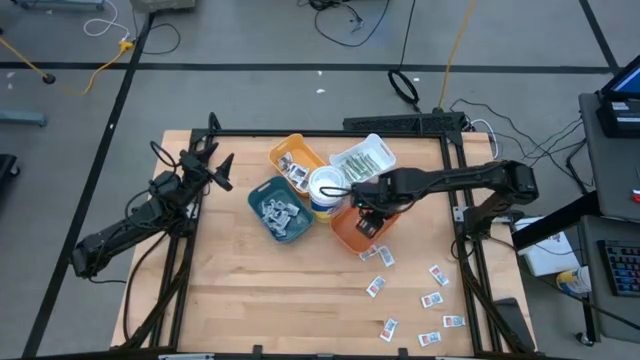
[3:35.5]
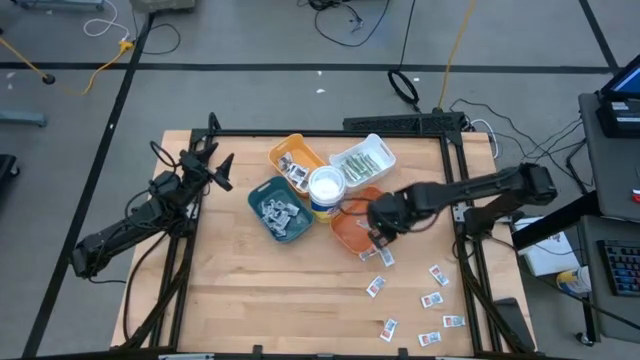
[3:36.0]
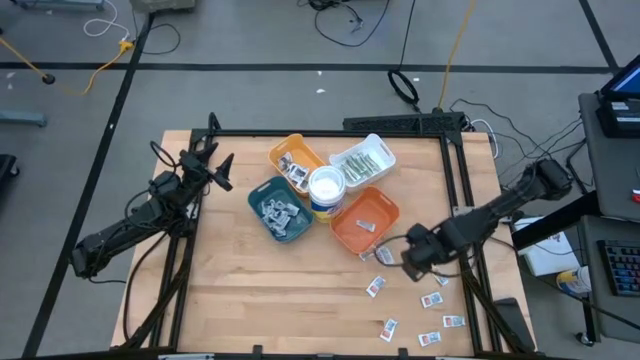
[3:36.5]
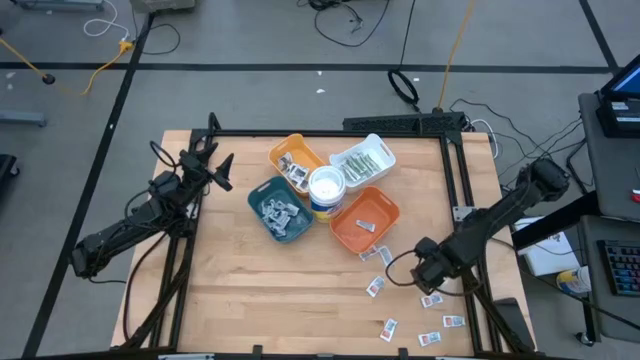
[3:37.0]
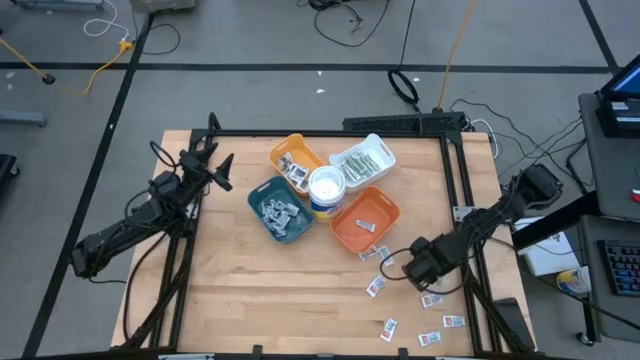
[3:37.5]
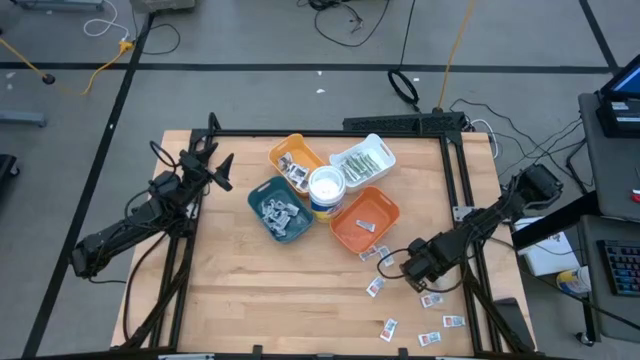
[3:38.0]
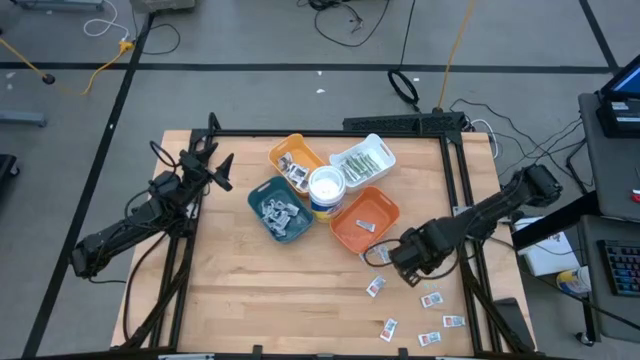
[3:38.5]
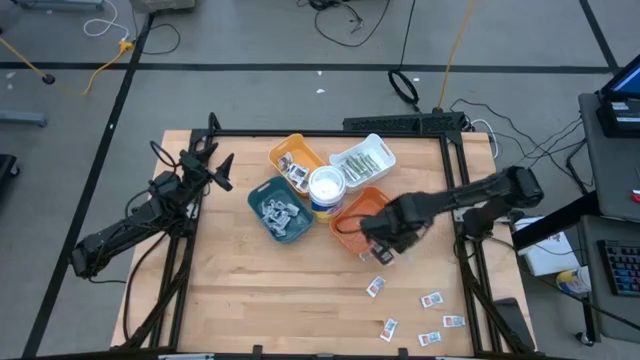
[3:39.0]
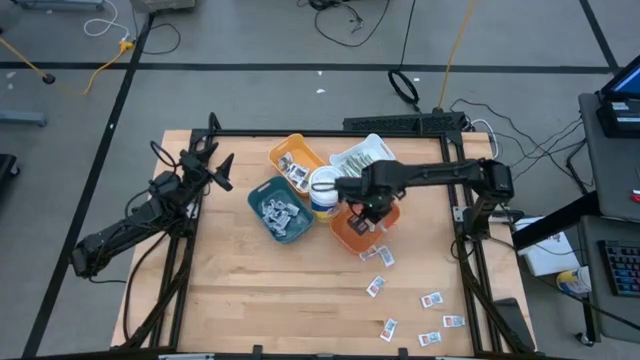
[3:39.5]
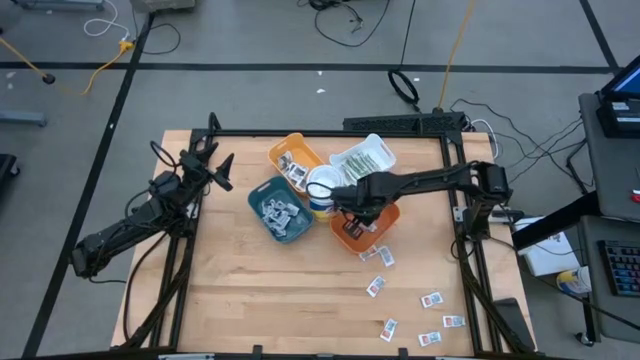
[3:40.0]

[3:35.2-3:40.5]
Task: Pick & Place First Aid Supplies
Put the orange pad into the orange bin

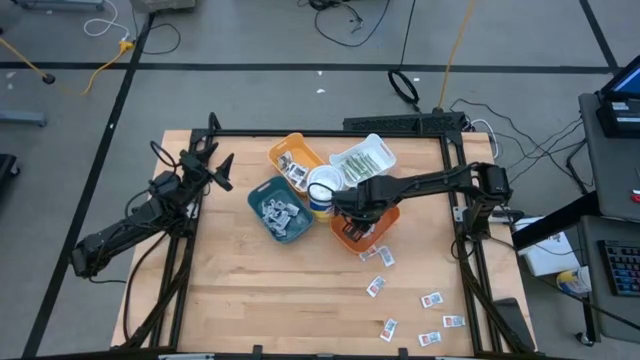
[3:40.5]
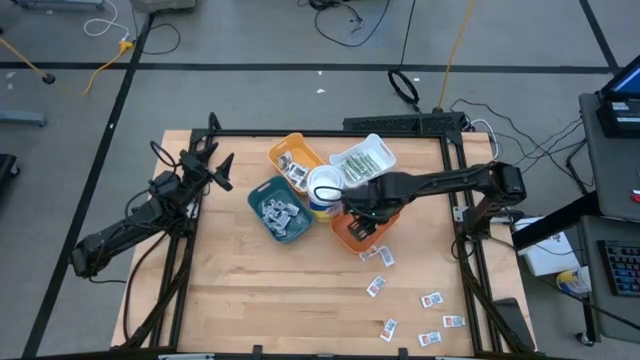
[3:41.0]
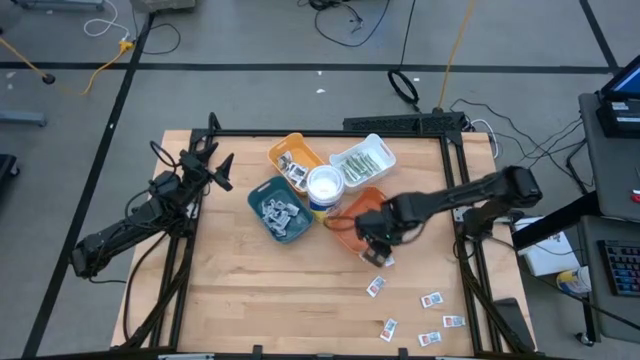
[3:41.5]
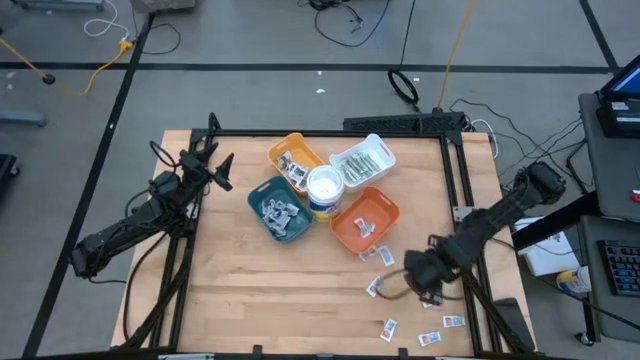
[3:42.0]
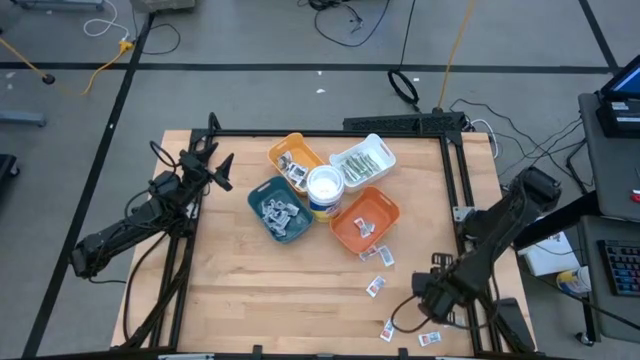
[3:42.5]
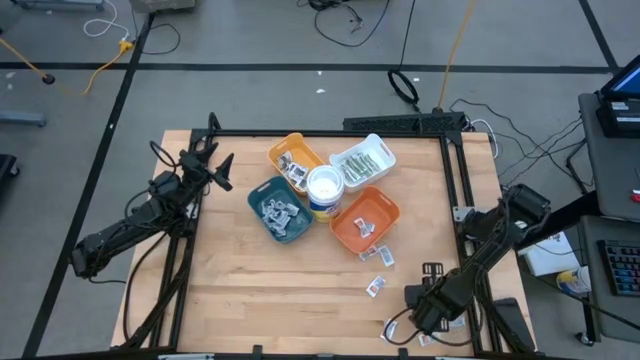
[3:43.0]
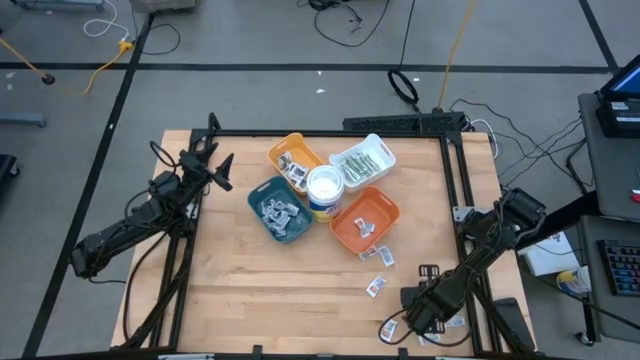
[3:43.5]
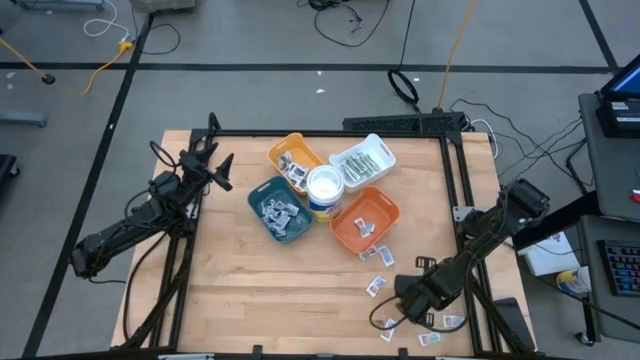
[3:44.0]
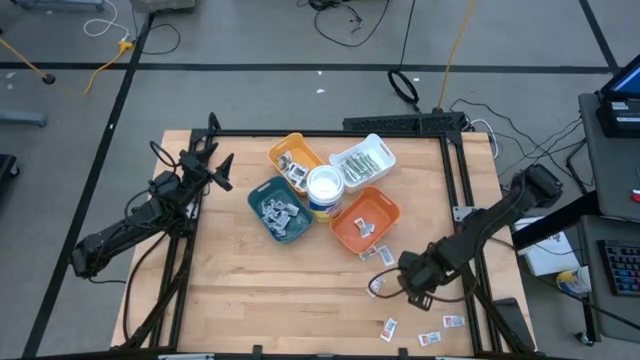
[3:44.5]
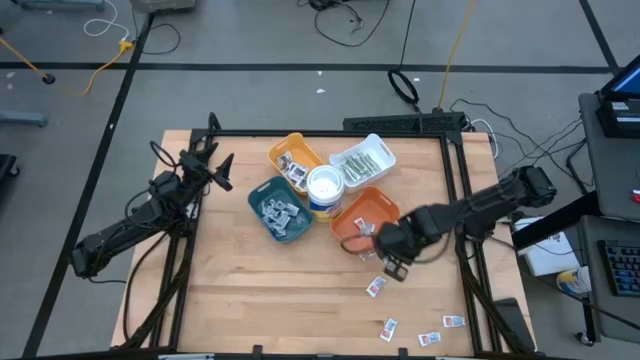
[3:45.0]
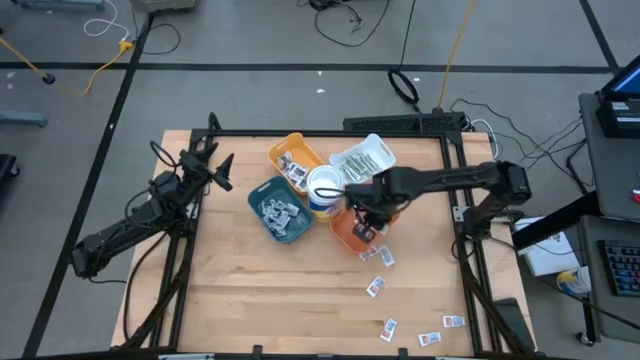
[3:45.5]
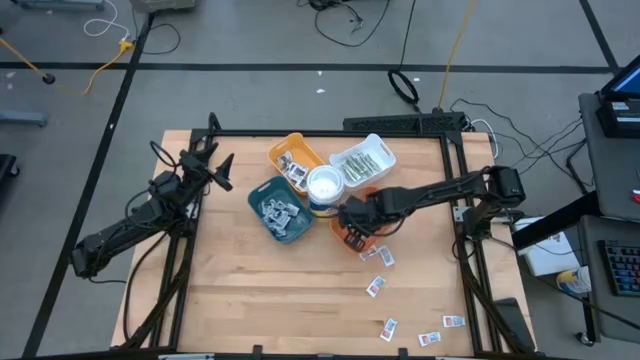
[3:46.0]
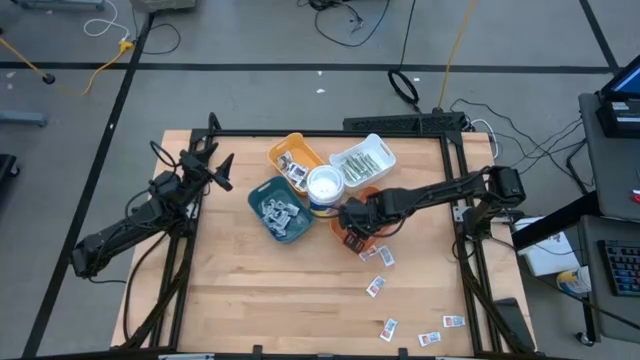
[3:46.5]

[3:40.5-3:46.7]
Put the orange pad into the orange bin

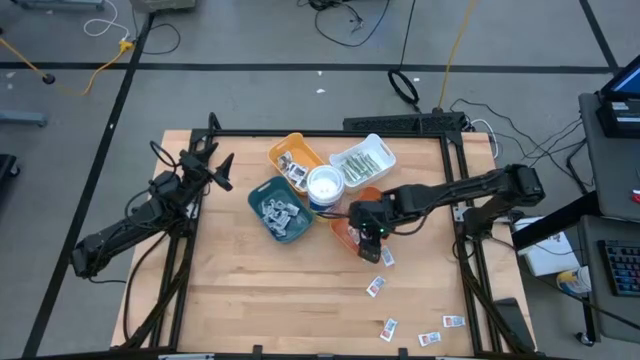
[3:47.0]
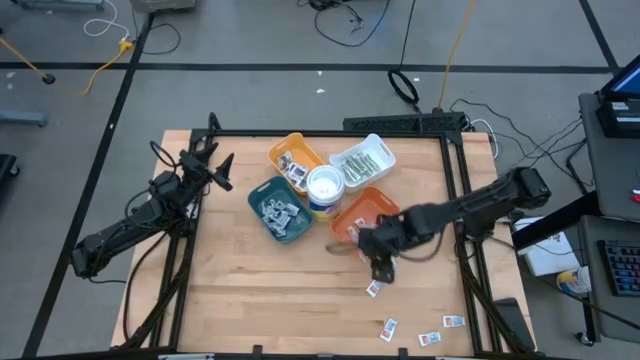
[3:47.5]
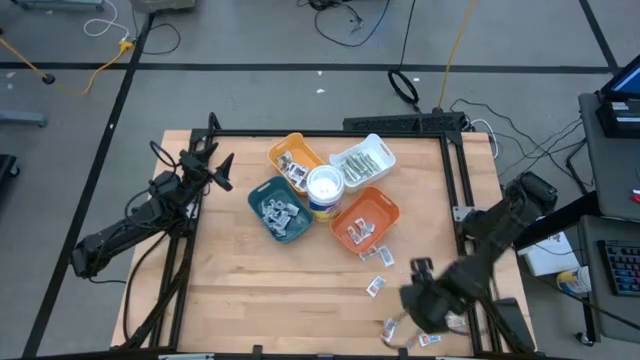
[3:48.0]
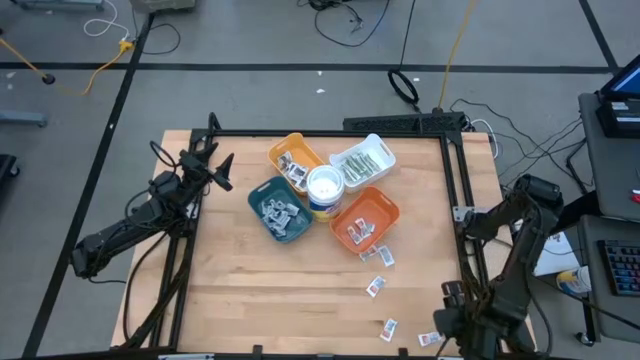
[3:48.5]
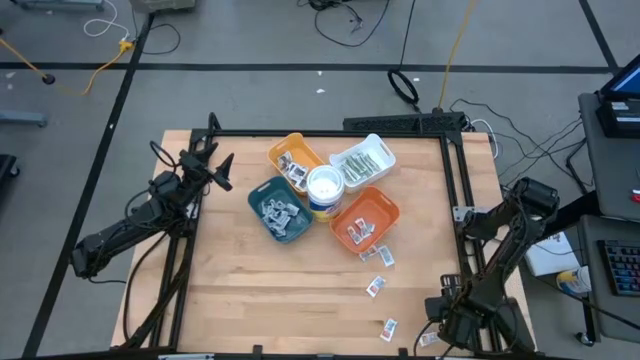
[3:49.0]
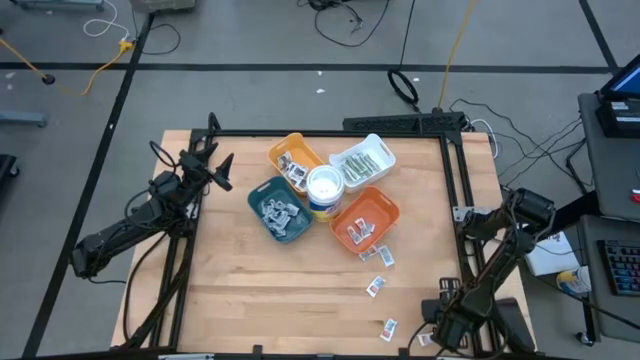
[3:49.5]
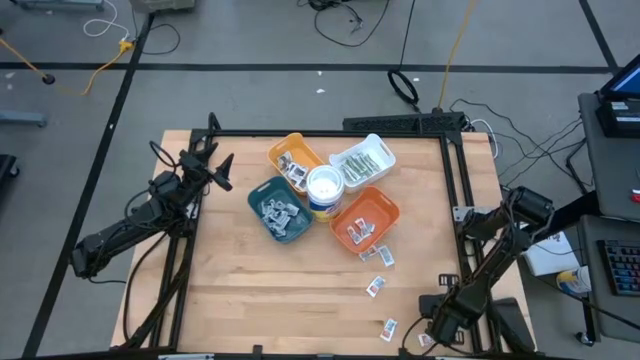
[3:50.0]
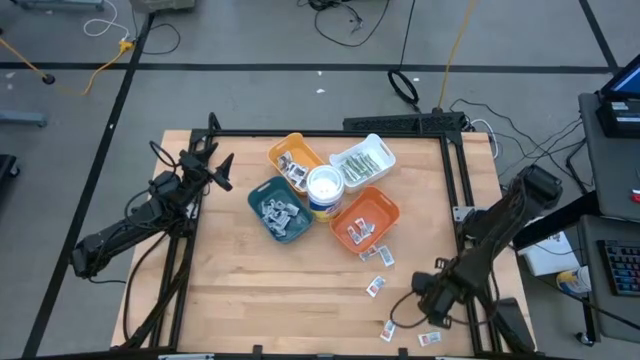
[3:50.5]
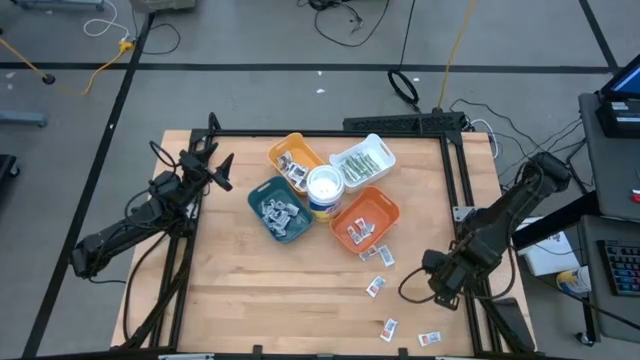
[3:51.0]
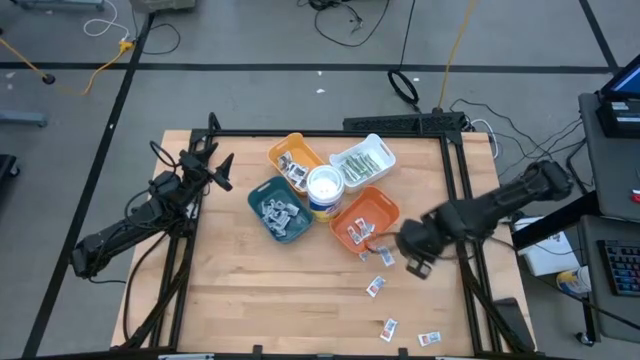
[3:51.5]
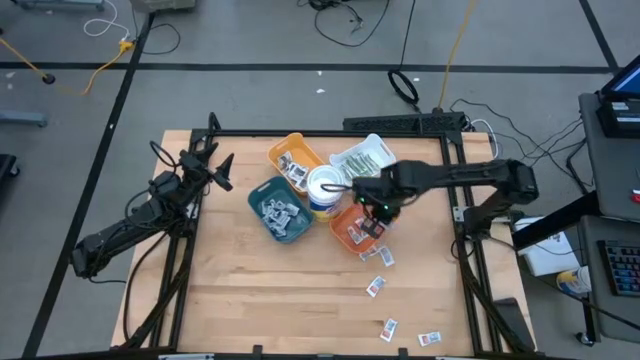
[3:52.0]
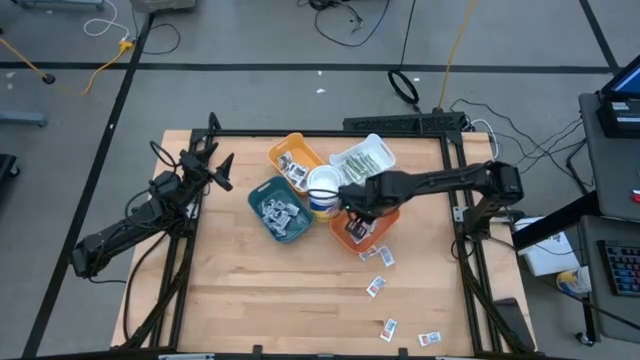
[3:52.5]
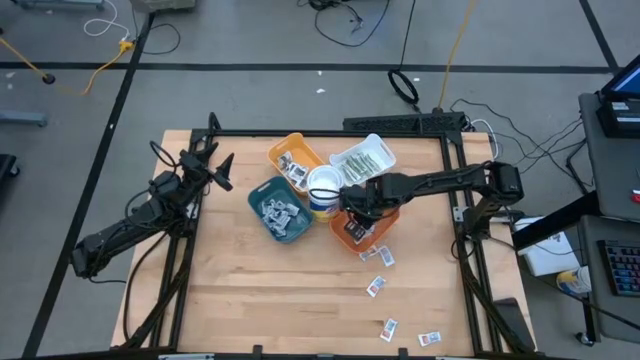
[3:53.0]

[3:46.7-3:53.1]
Put the orange pad into the orange bin

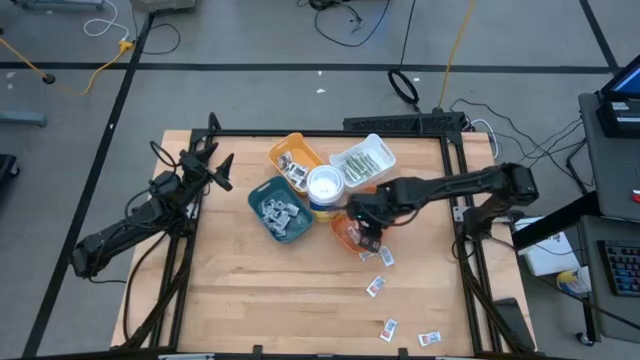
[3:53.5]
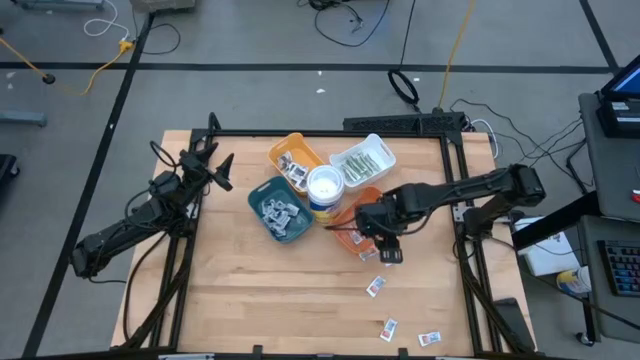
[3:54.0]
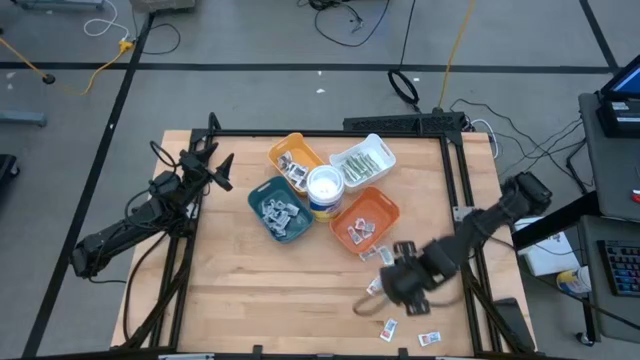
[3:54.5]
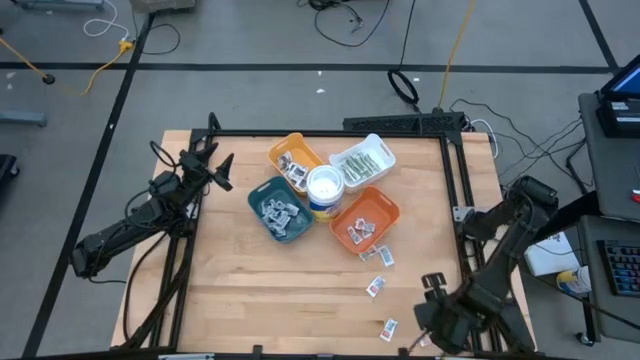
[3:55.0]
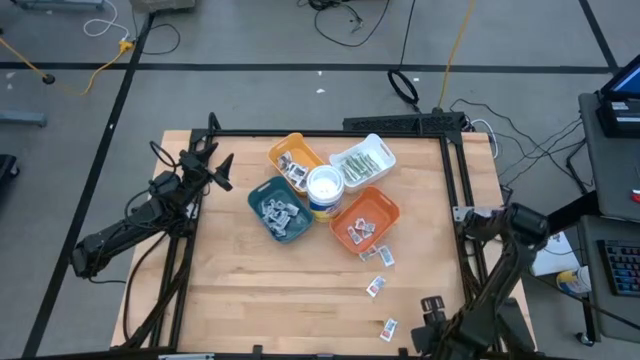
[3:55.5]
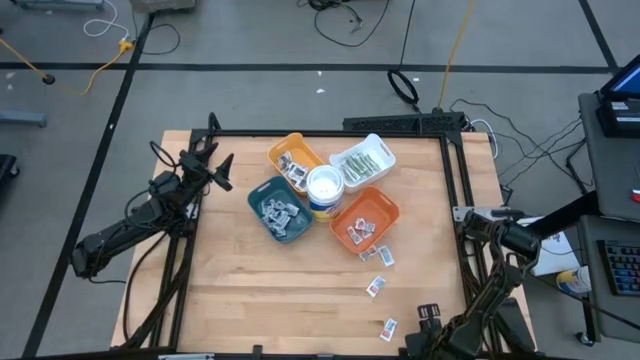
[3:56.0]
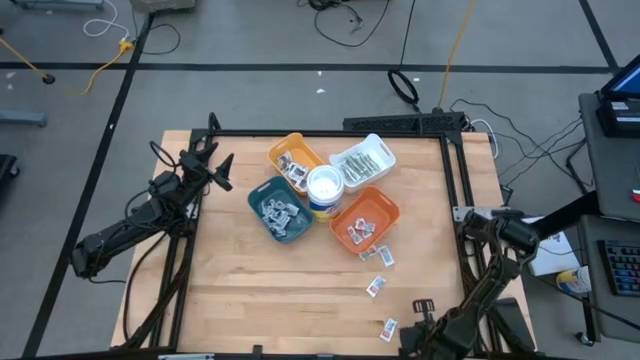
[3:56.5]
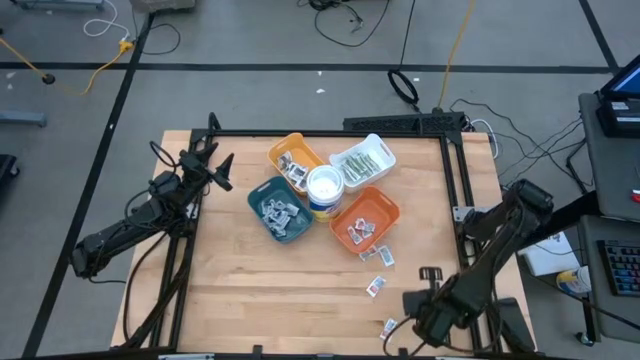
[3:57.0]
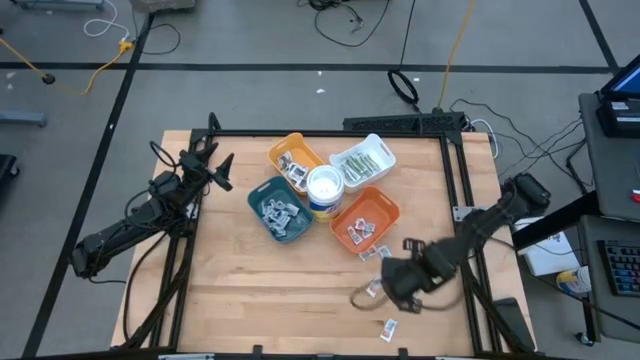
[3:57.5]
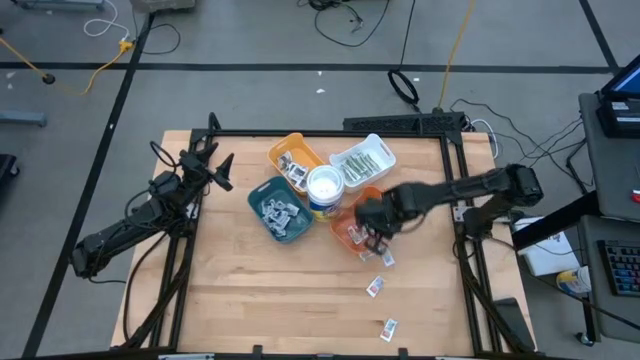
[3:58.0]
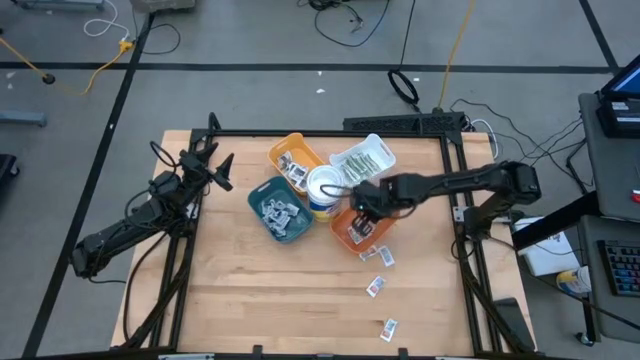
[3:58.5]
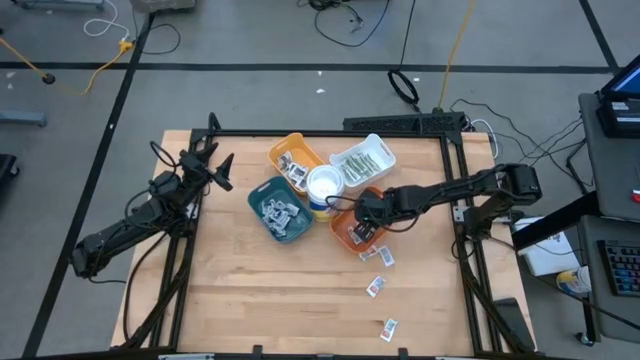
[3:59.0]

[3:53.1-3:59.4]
Put the orange pad into the orange bin
